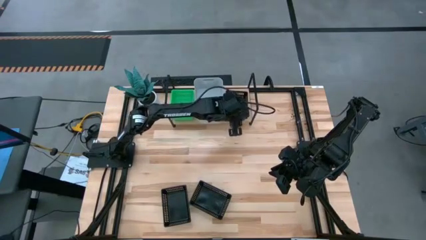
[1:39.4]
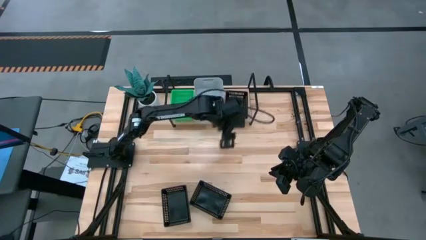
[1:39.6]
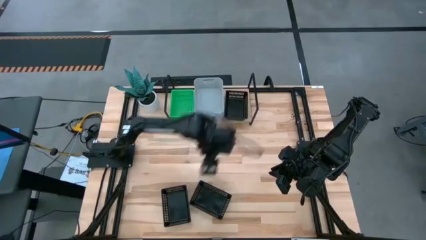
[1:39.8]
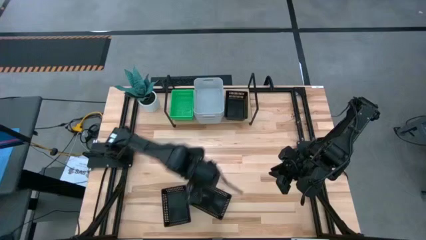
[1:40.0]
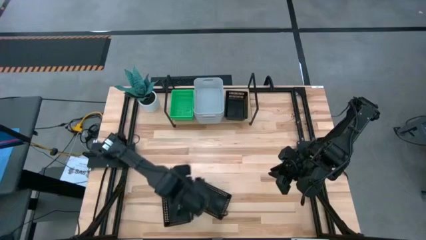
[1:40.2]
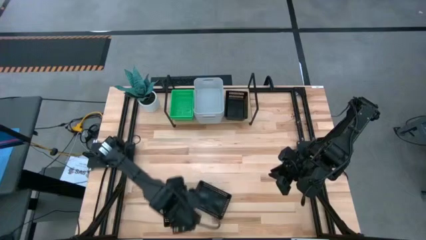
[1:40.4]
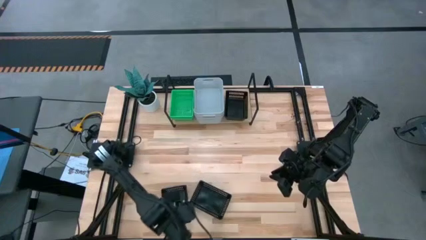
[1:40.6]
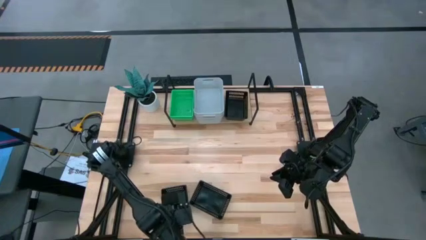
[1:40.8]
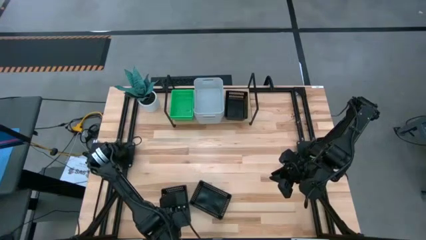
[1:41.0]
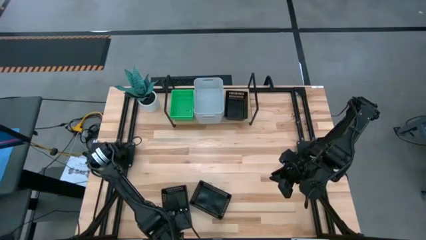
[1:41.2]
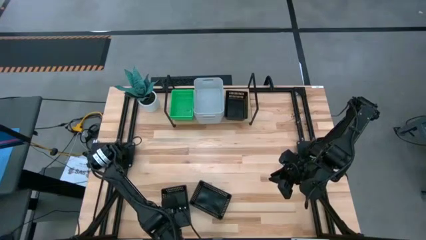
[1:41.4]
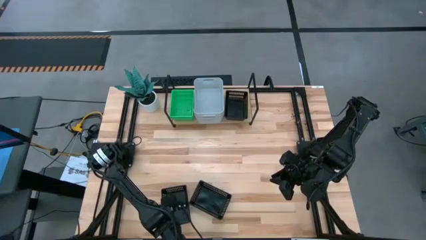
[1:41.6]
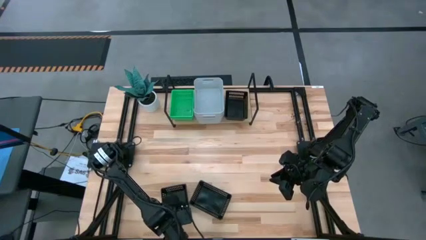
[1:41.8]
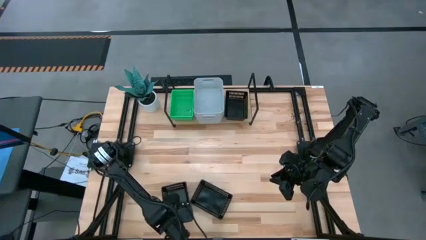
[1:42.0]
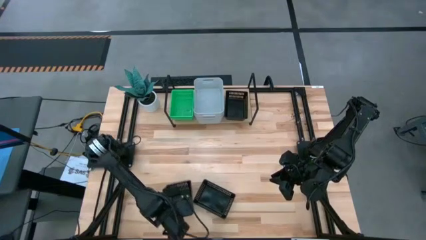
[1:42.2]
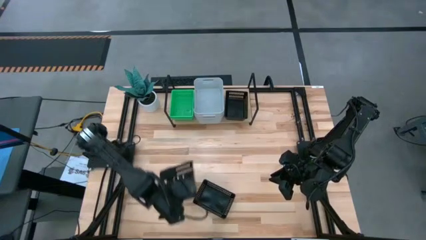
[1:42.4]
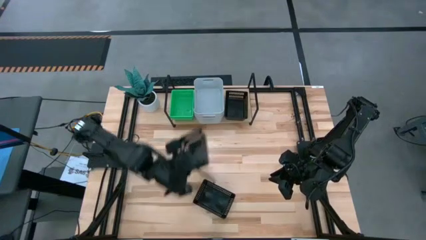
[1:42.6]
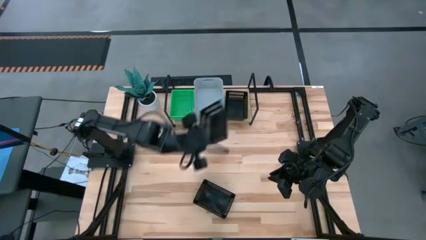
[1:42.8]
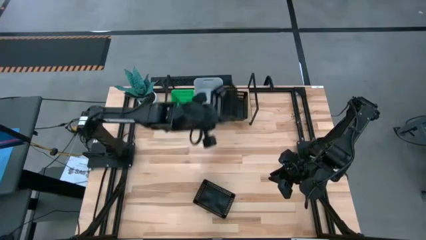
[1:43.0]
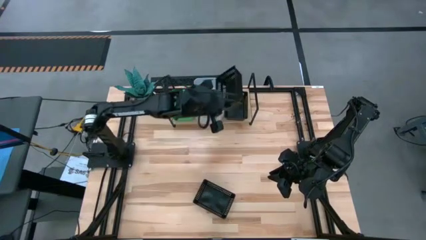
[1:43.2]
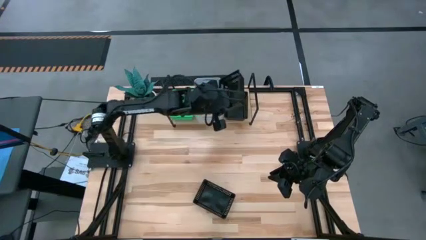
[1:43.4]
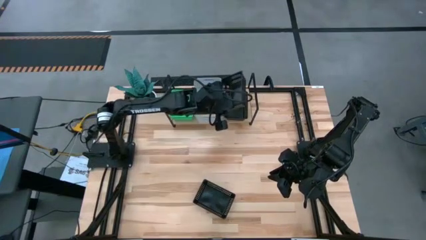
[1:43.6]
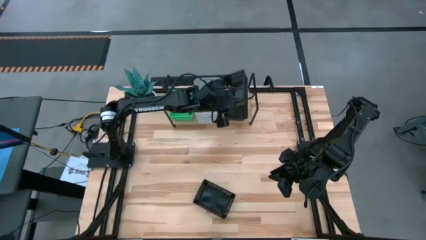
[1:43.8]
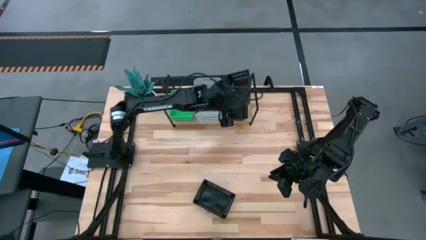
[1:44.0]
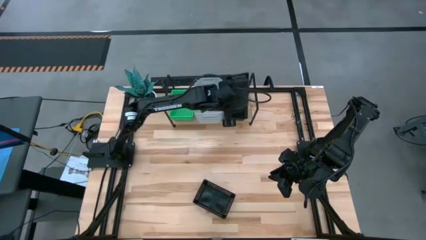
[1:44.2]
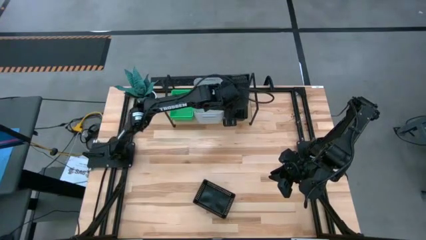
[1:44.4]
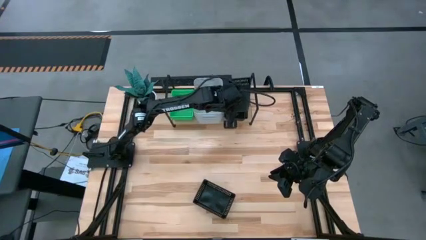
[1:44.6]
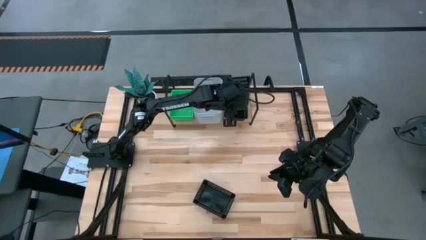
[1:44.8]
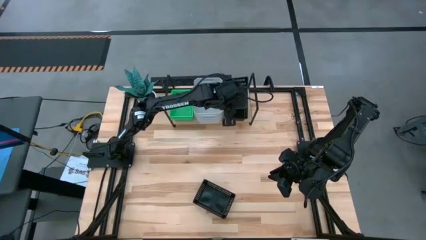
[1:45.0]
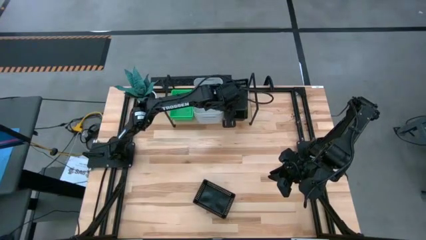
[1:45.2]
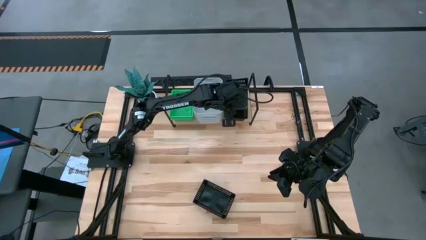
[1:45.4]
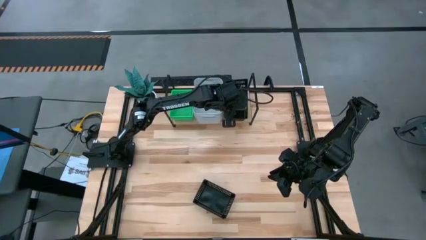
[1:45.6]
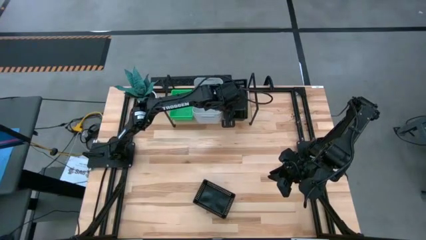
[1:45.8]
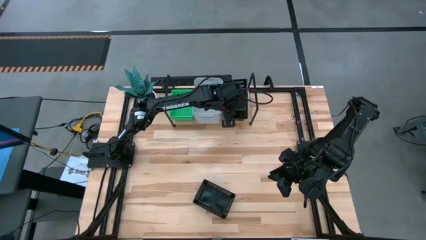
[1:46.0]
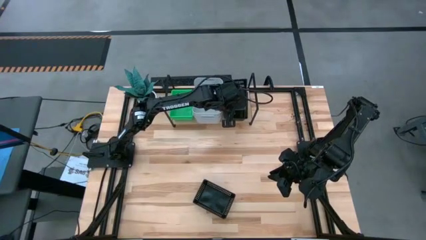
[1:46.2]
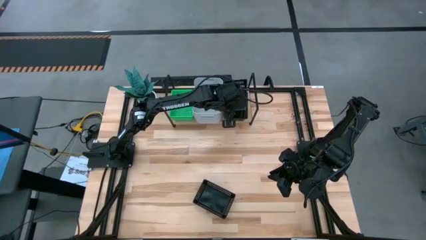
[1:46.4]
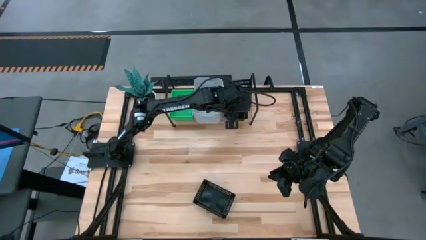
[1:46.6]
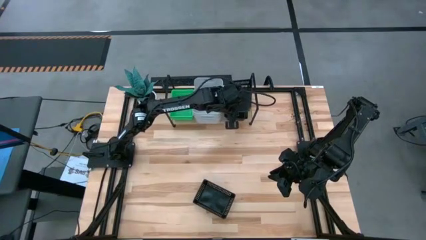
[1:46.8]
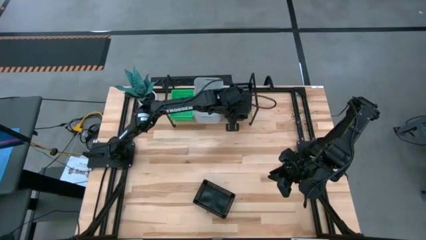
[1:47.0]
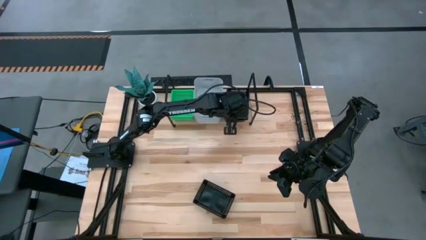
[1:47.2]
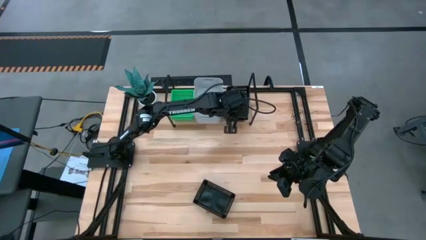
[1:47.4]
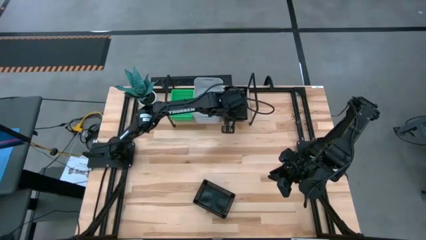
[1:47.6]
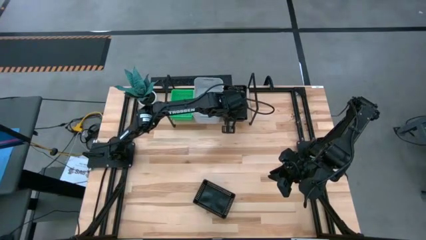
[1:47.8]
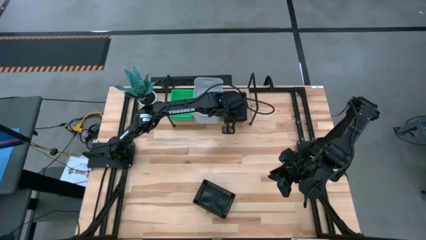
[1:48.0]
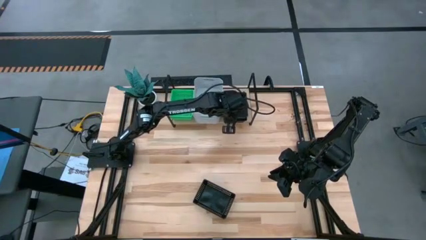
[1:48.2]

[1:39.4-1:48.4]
Task: Stack baskets on shelf by color
Stack the left black bin on top of the black bin on the shelf

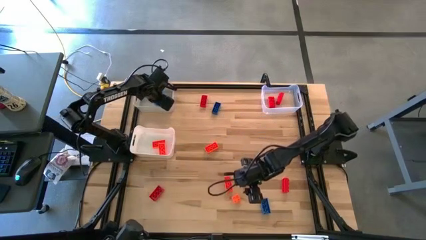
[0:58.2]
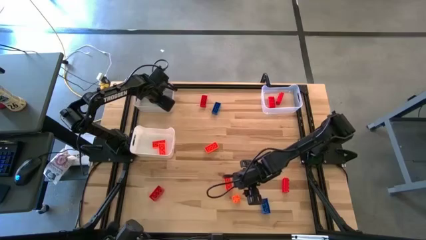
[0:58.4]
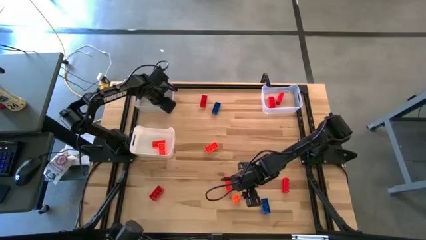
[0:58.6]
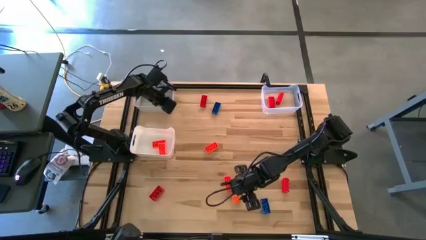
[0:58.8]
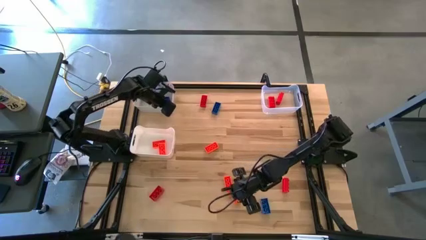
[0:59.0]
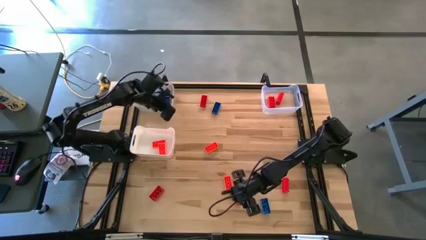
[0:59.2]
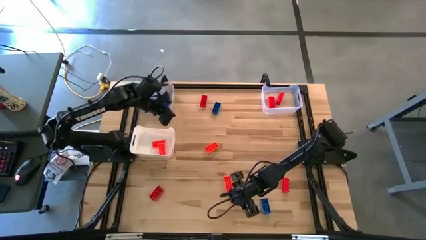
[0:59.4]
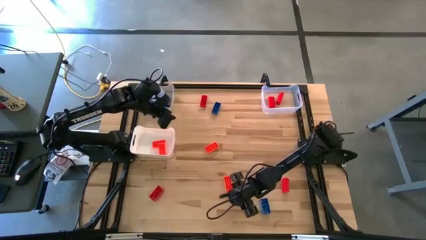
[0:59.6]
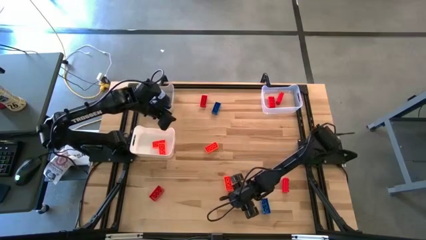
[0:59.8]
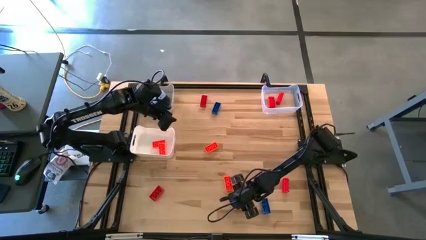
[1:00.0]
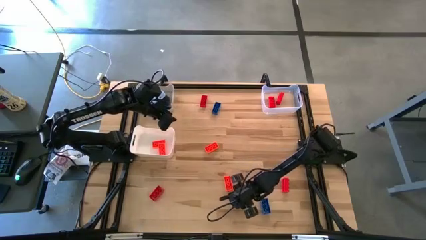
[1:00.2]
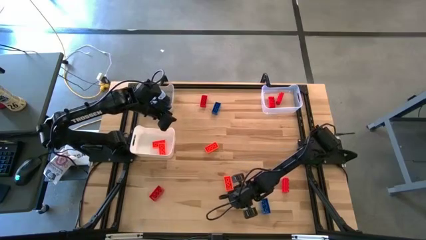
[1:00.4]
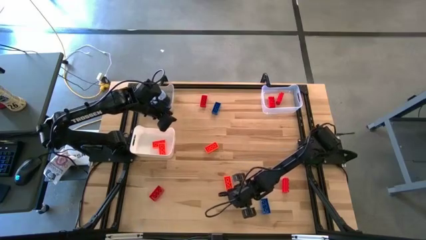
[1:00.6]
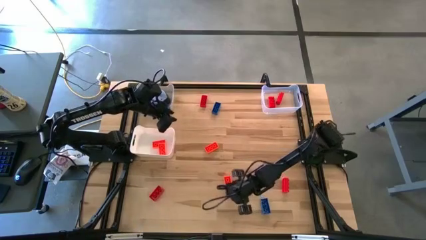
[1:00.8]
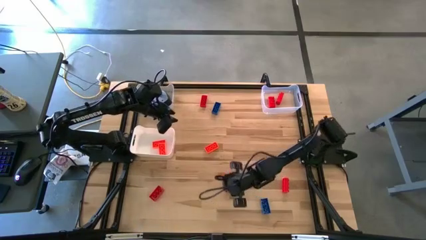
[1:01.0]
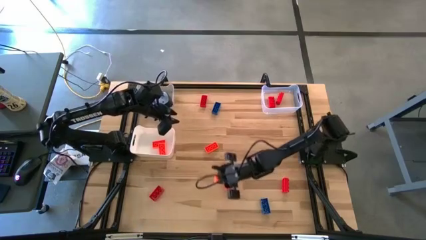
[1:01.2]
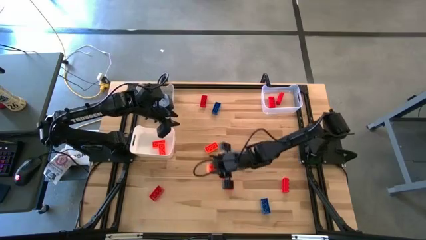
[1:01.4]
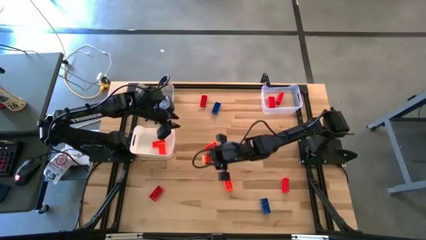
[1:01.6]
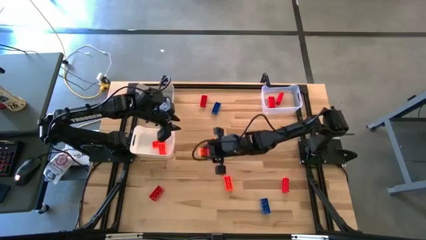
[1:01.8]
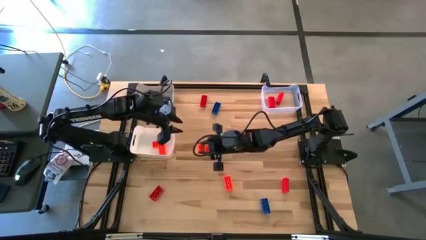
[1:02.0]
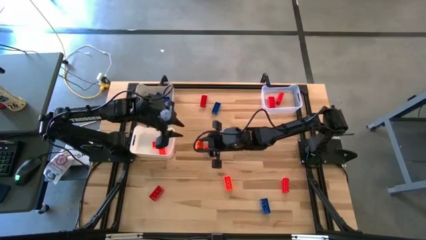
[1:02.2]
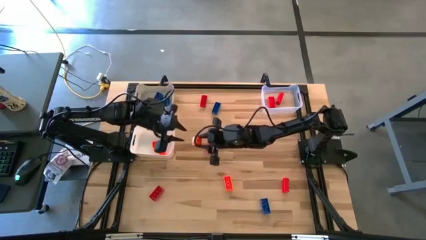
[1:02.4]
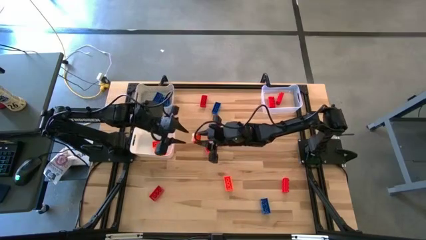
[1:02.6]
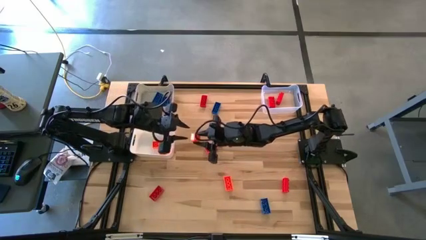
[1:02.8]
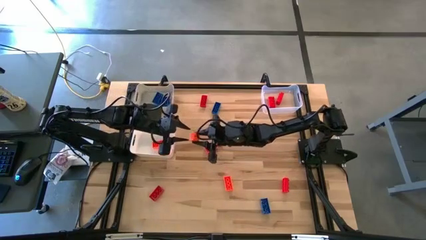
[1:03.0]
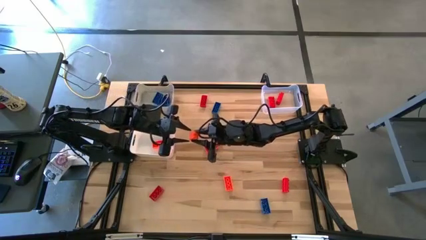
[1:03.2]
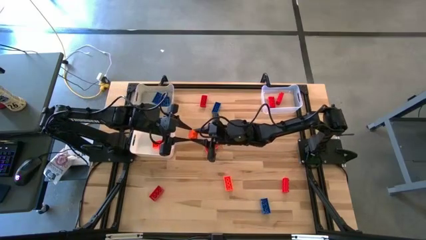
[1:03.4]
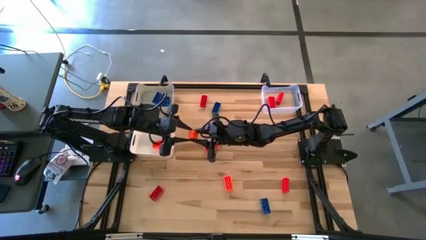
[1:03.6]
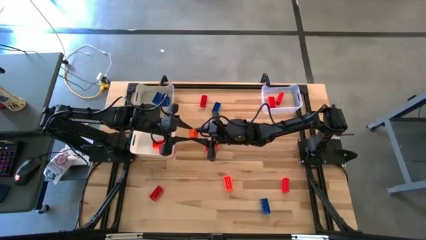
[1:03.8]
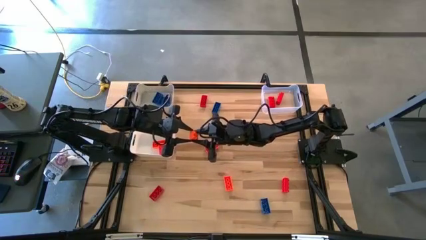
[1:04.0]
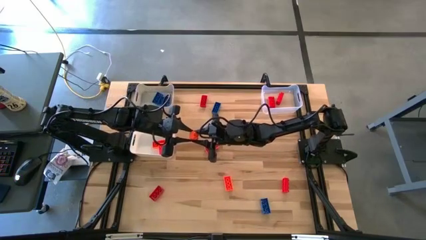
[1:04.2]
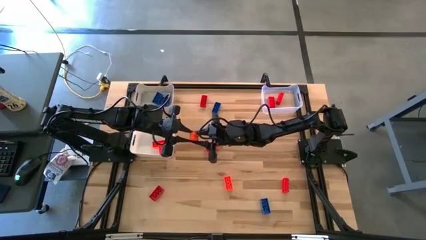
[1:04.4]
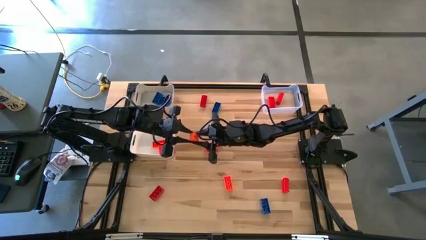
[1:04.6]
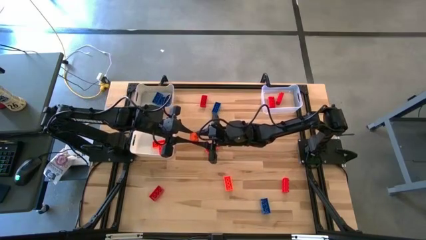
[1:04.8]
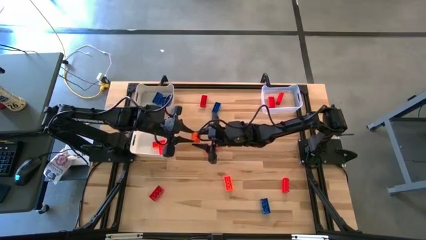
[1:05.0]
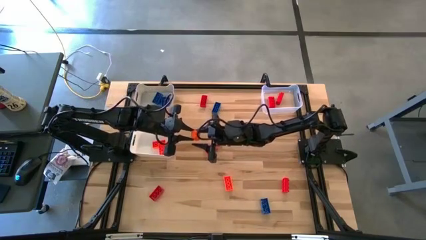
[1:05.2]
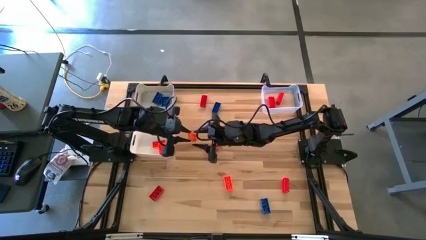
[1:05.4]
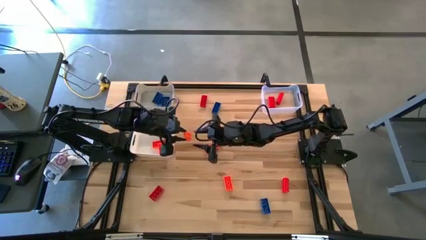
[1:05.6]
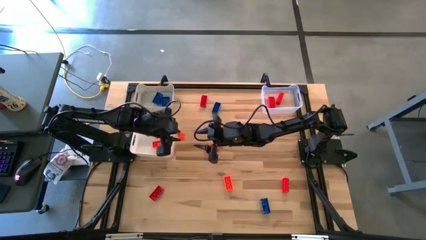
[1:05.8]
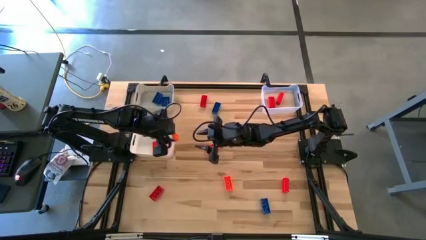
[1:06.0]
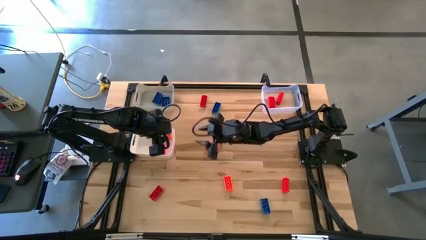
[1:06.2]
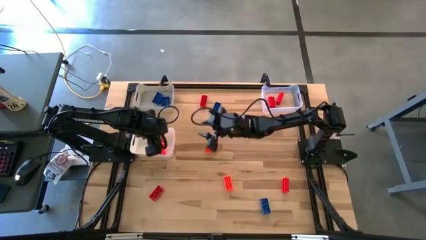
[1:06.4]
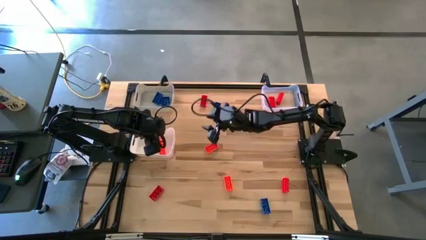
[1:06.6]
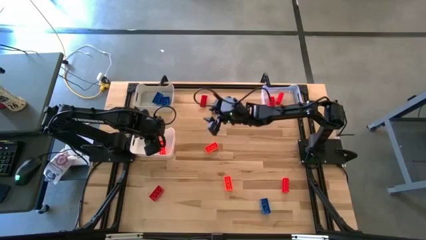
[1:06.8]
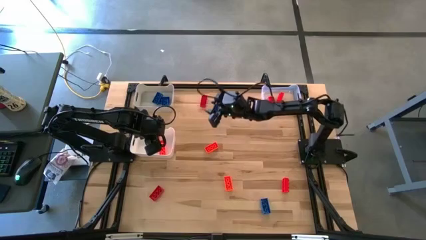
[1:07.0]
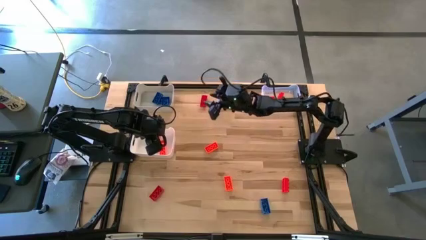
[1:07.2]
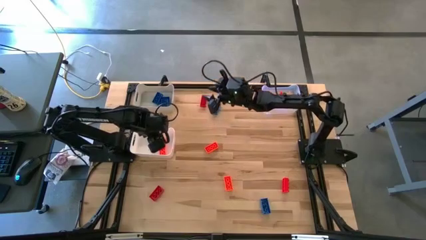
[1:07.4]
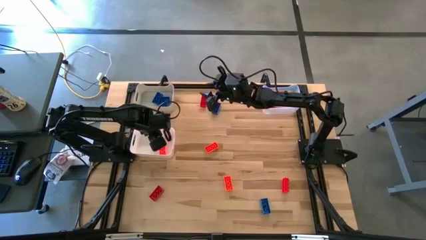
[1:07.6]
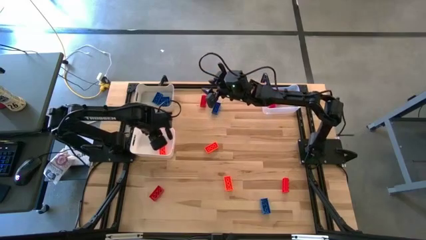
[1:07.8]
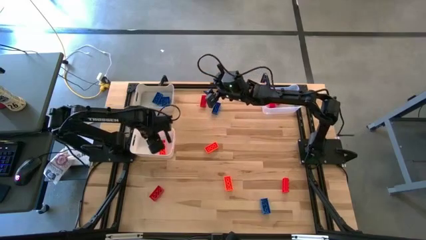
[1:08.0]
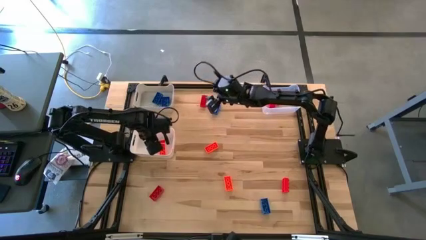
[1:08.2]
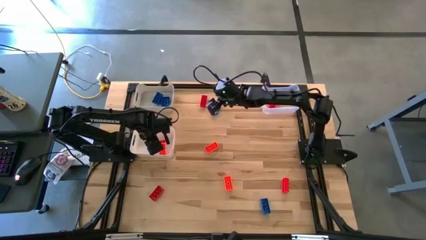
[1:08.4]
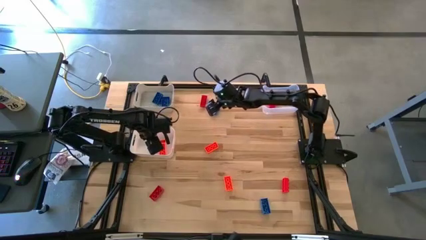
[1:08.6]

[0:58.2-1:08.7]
Task: Sort & place blocks by color
Put the orange game piece into the white bin
